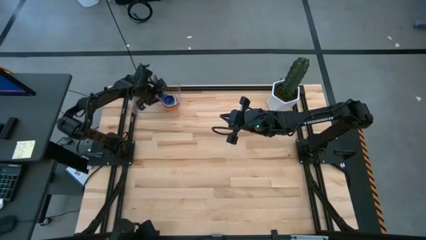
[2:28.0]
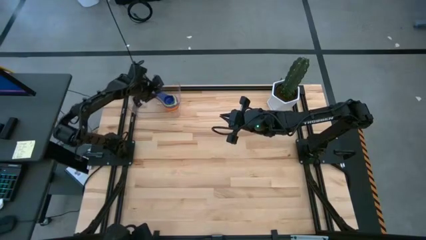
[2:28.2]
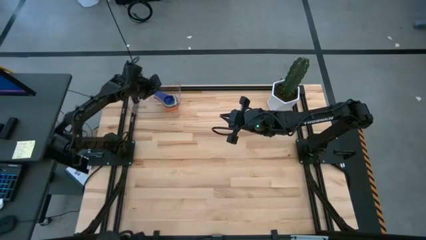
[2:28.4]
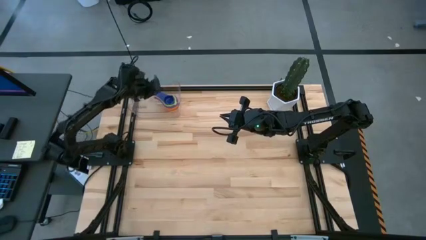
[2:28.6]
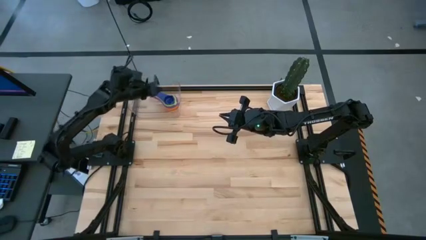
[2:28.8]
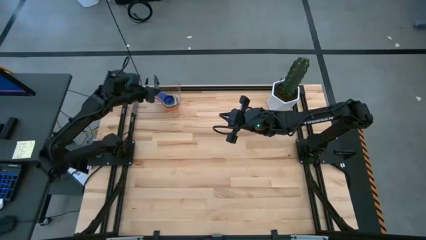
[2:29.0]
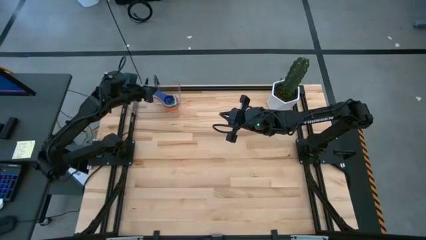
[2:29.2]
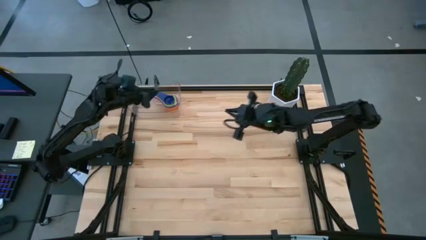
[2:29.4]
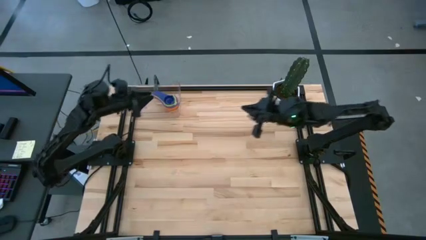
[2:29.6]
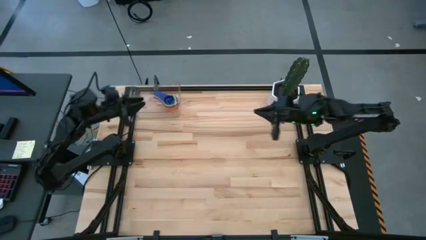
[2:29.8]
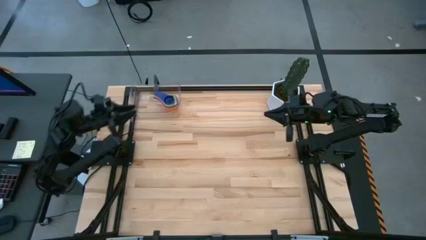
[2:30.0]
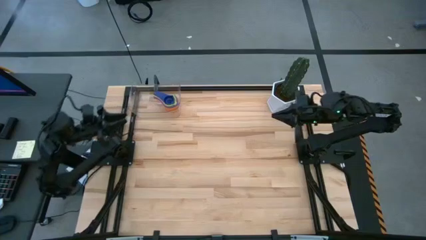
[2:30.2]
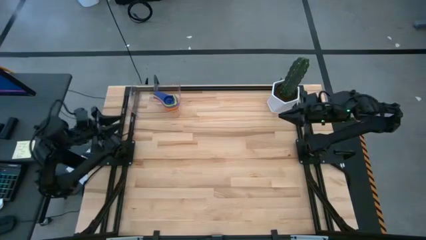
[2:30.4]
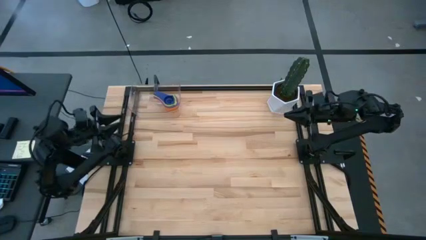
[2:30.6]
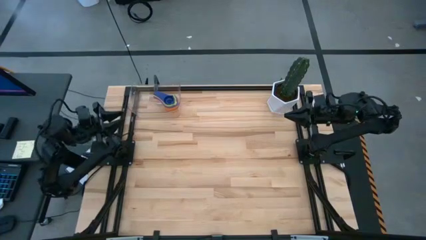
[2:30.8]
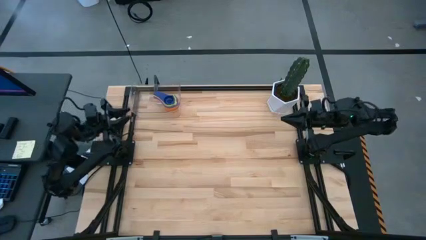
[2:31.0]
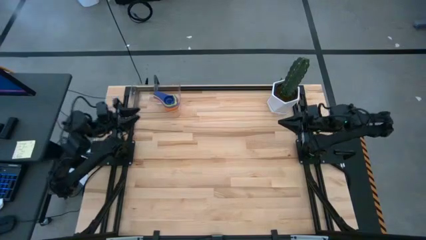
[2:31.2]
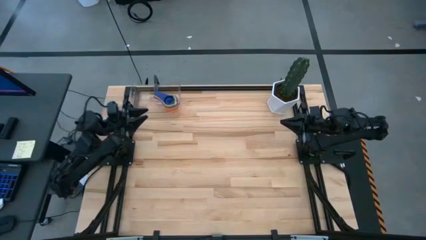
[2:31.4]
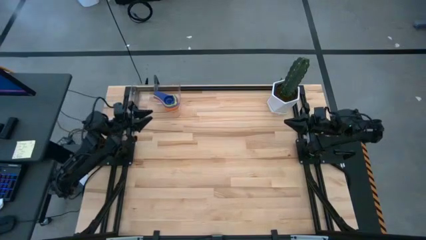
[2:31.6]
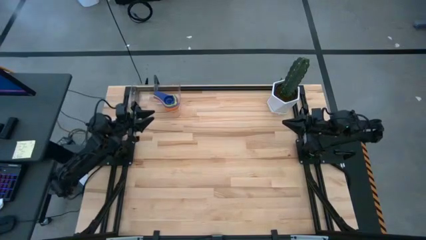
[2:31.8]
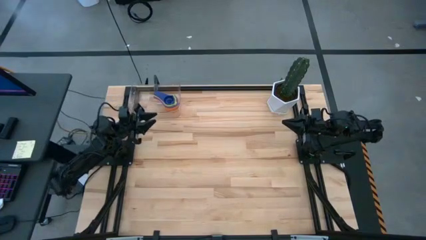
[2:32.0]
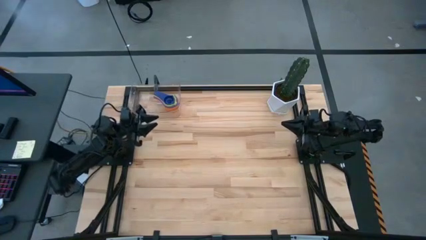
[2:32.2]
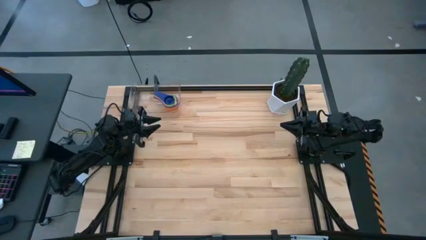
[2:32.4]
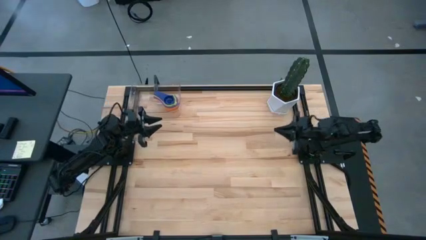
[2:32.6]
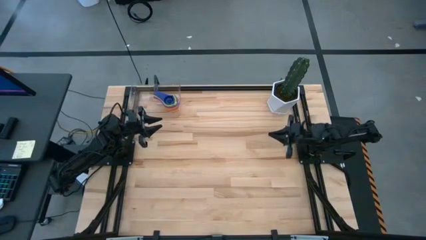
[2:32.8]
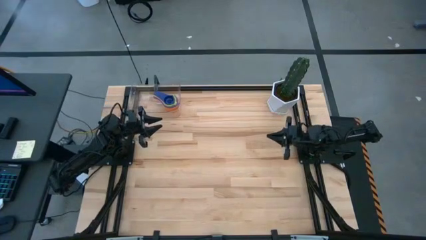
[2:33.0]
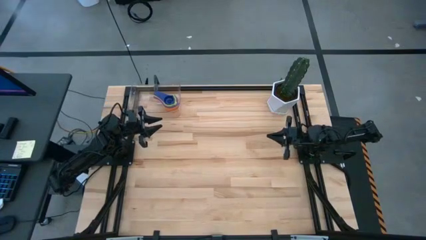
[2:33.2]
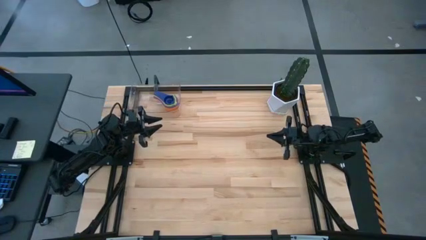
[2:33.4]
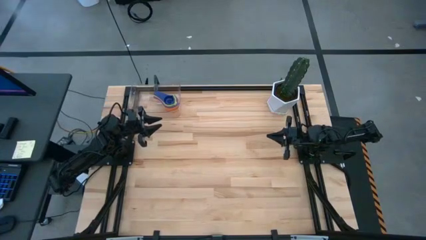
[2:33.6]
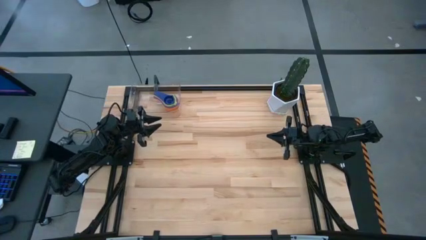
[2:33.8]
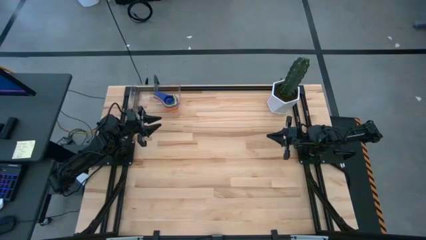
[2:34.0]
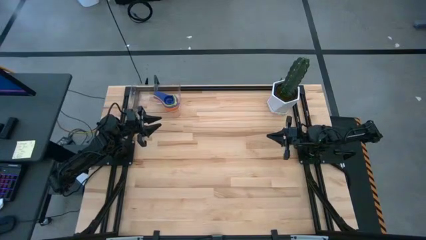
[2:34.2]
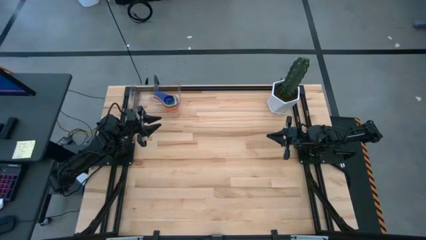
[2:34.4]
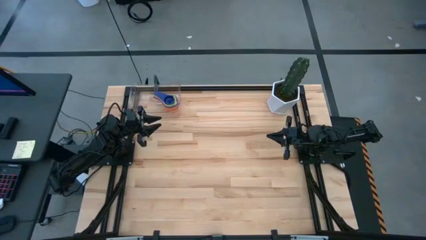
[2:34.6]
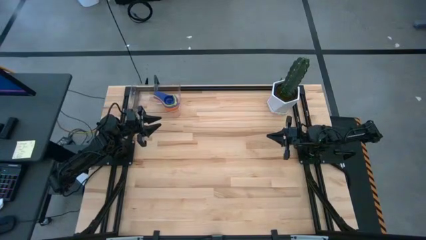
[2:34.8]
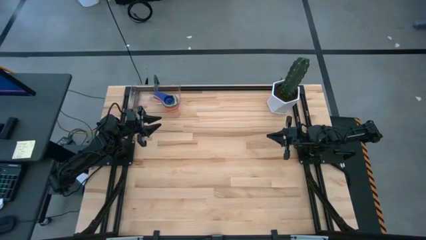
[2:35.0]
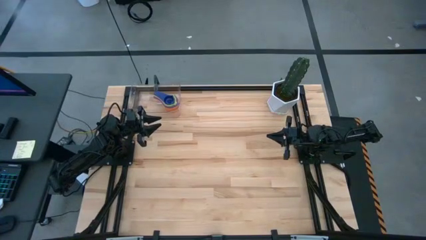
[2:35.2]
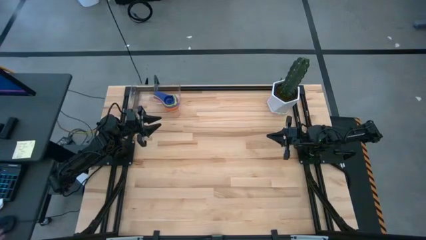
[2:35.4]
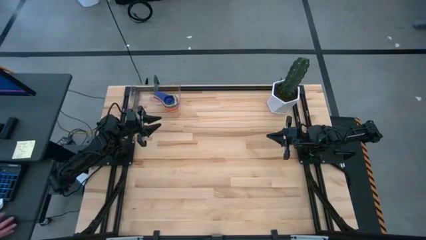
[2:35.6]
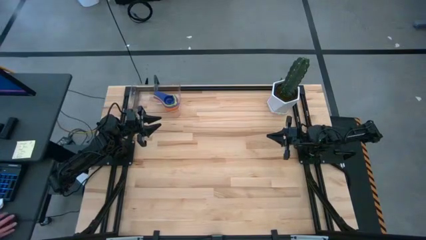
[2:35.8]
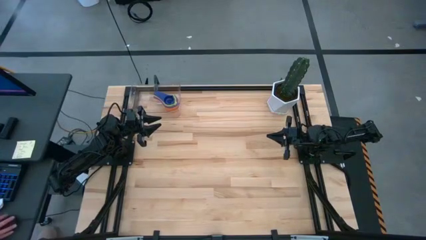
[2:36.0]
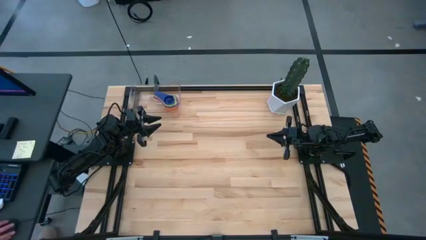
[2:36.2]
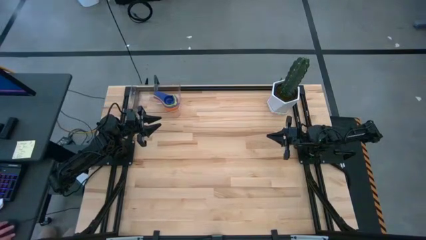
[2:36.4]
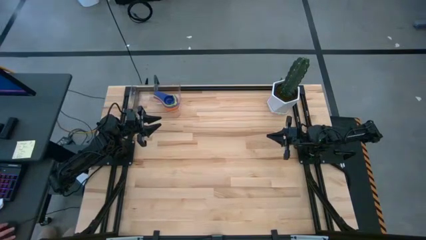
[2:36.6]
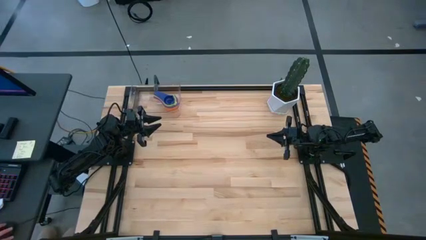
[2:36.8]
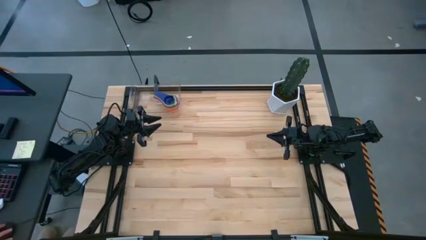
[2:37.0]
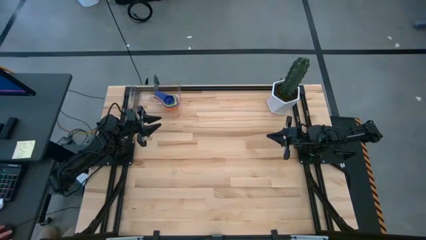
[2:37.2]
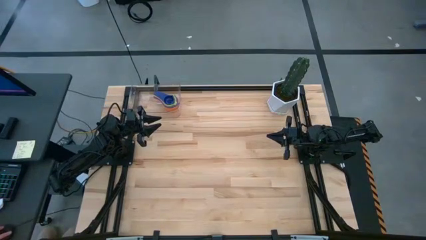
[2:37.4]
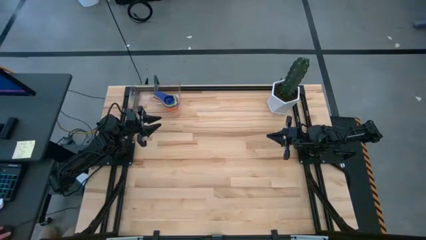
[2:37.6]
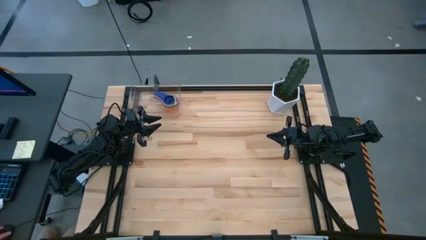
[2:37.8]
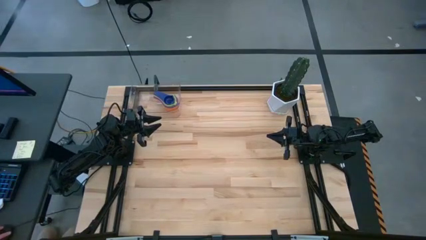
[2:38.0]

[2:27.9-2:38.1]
Task: Nest measuring cups in basket
Return to Home Position
